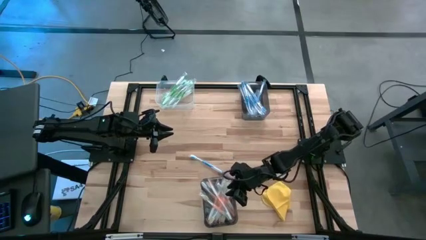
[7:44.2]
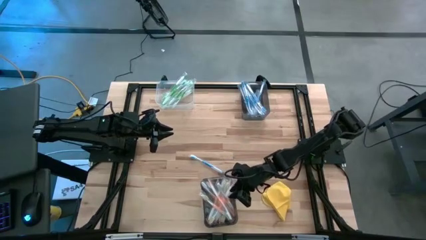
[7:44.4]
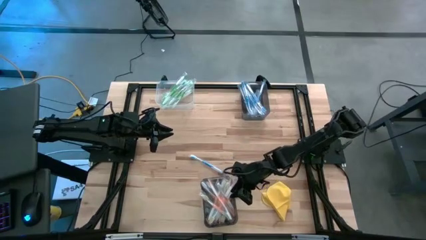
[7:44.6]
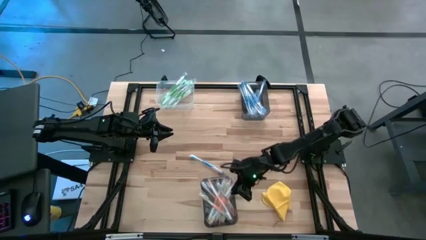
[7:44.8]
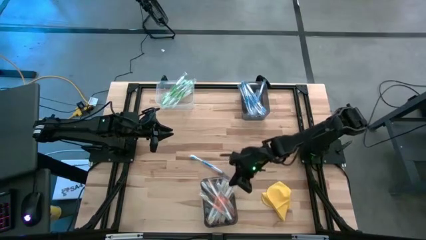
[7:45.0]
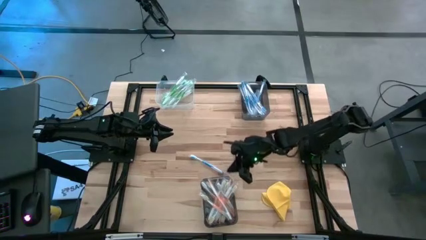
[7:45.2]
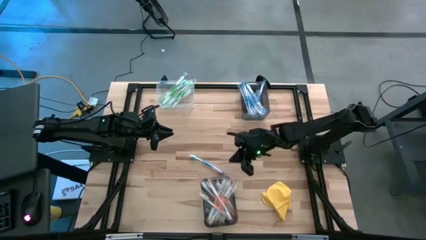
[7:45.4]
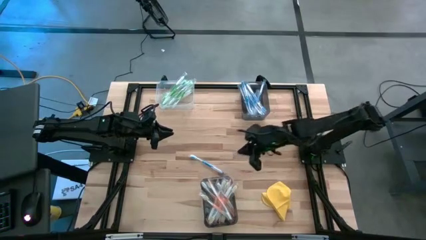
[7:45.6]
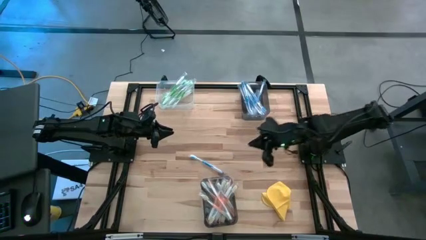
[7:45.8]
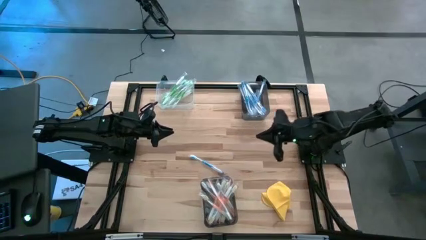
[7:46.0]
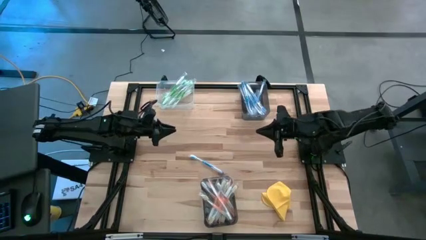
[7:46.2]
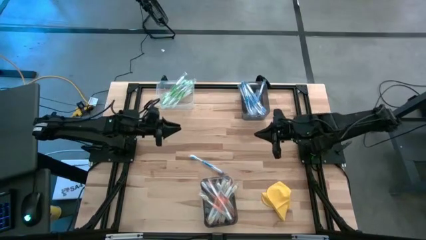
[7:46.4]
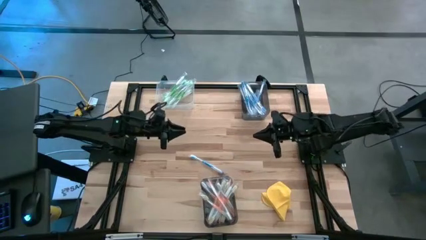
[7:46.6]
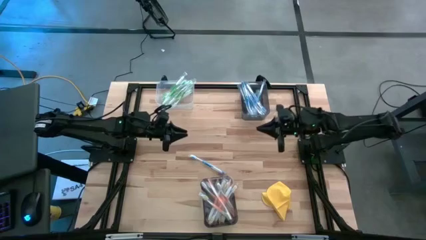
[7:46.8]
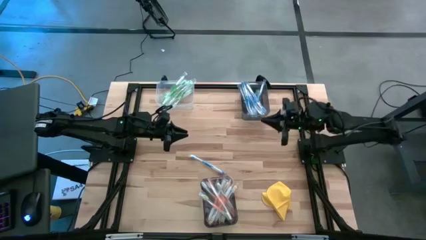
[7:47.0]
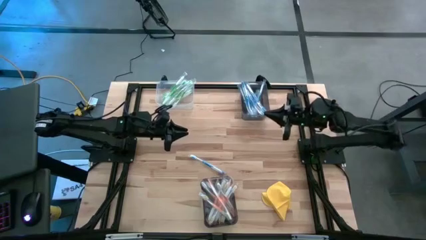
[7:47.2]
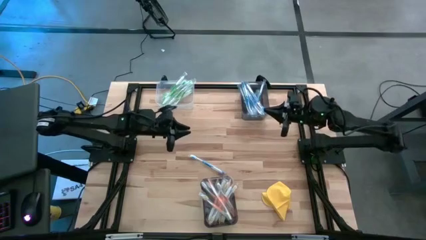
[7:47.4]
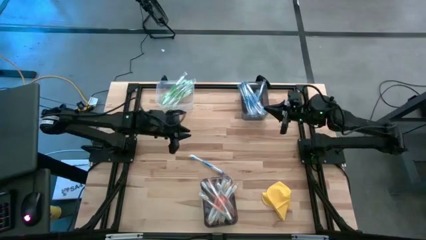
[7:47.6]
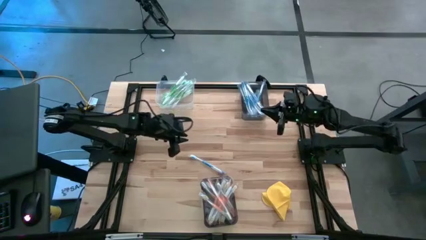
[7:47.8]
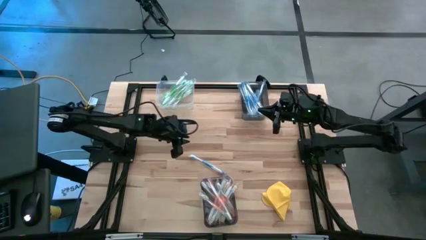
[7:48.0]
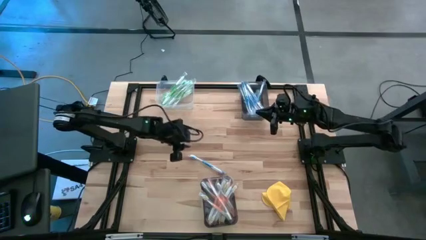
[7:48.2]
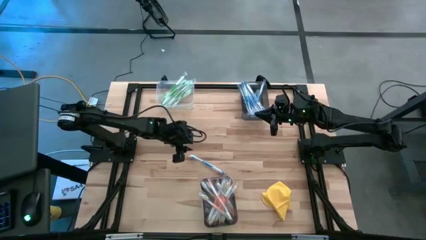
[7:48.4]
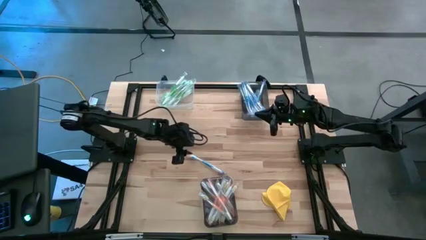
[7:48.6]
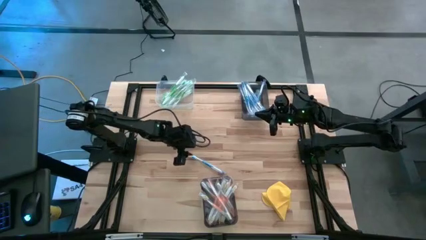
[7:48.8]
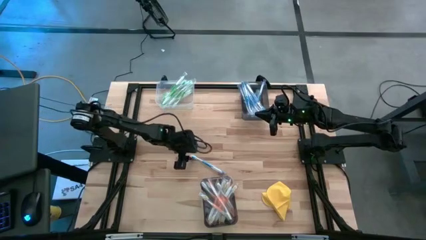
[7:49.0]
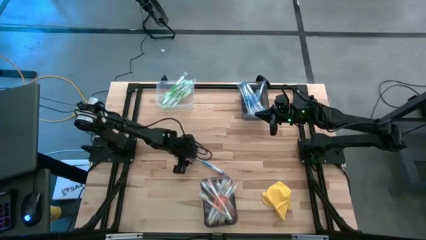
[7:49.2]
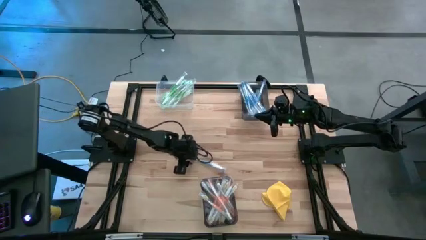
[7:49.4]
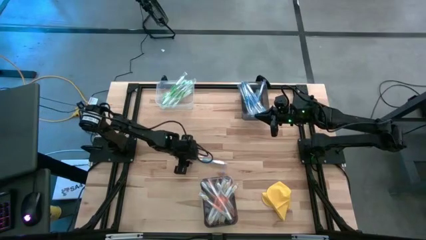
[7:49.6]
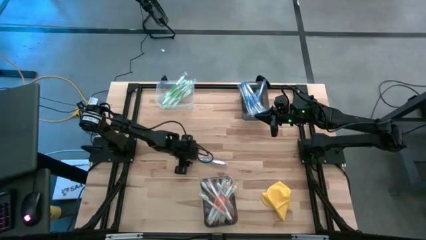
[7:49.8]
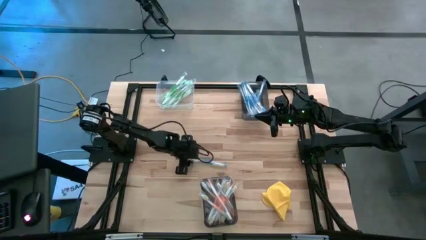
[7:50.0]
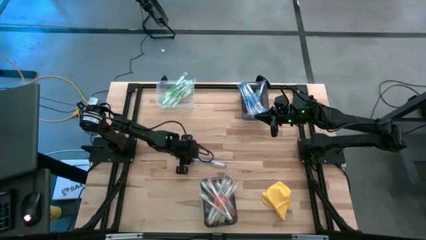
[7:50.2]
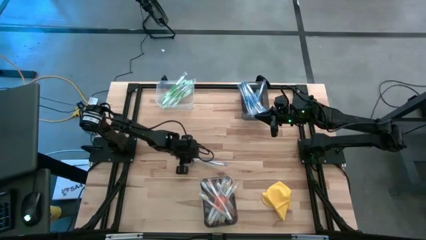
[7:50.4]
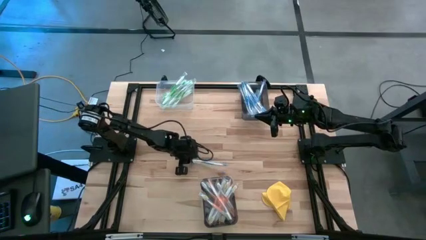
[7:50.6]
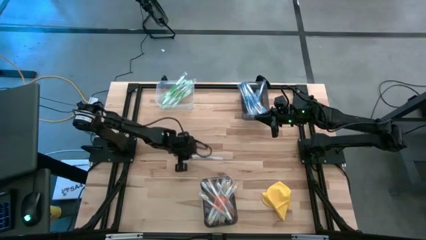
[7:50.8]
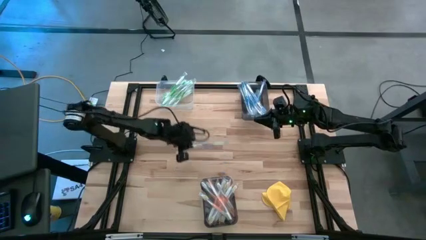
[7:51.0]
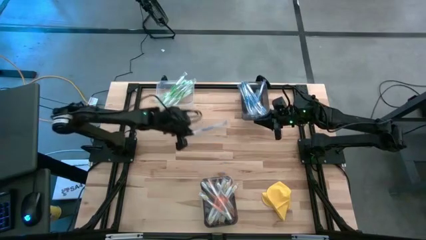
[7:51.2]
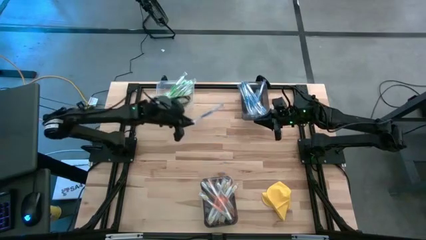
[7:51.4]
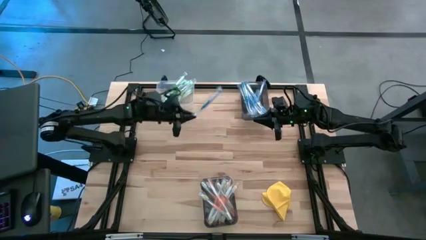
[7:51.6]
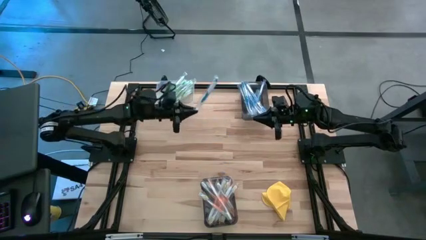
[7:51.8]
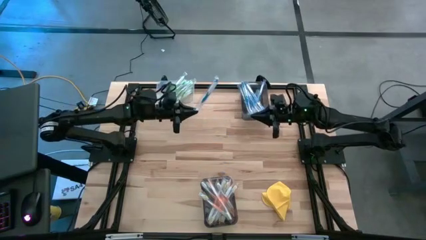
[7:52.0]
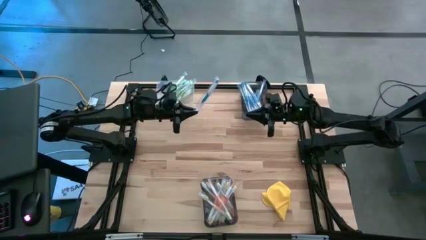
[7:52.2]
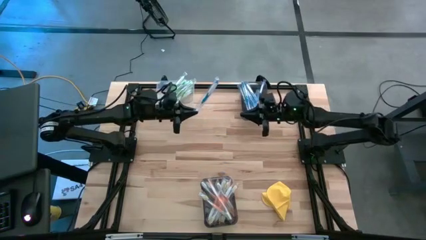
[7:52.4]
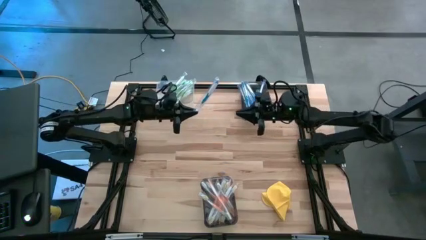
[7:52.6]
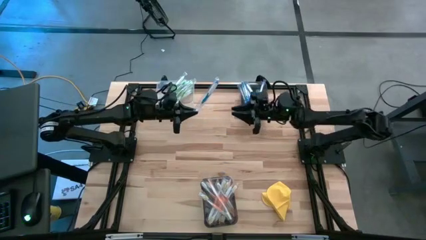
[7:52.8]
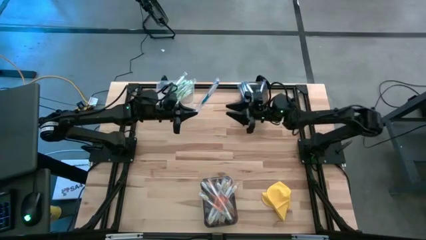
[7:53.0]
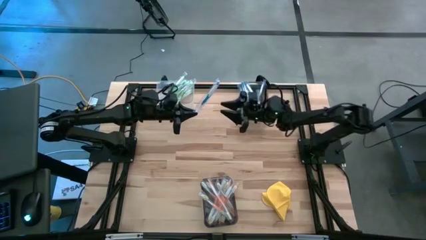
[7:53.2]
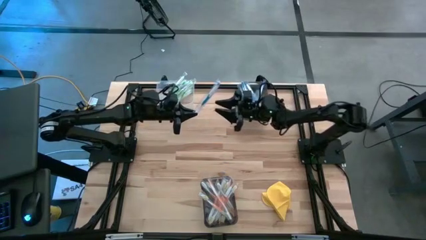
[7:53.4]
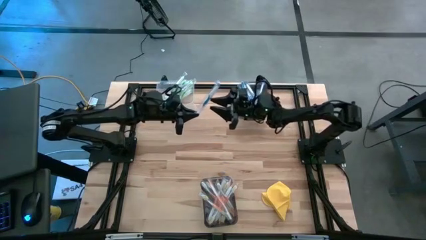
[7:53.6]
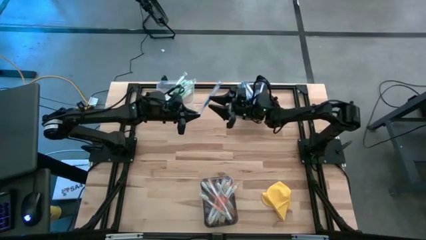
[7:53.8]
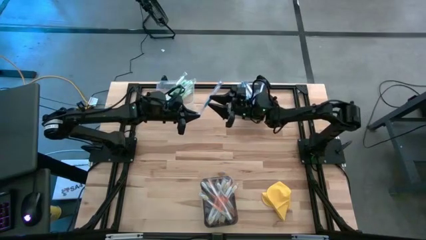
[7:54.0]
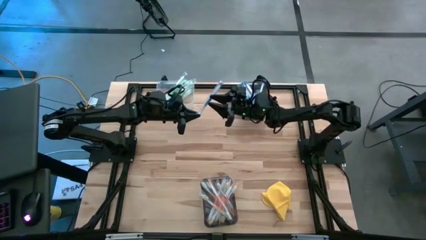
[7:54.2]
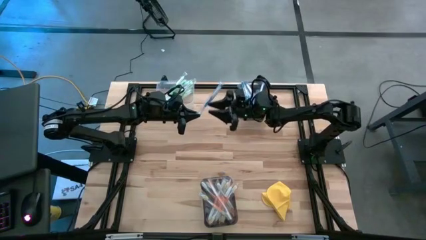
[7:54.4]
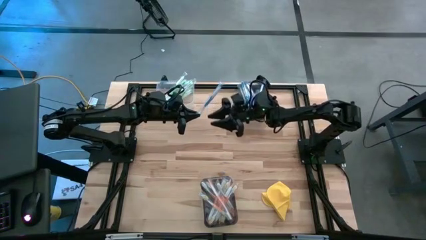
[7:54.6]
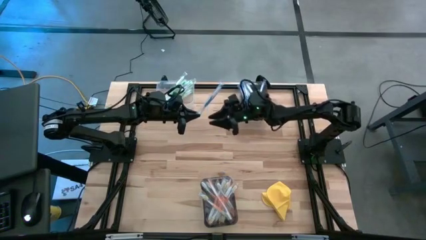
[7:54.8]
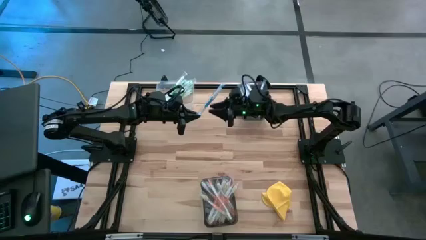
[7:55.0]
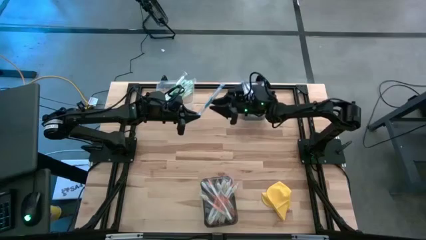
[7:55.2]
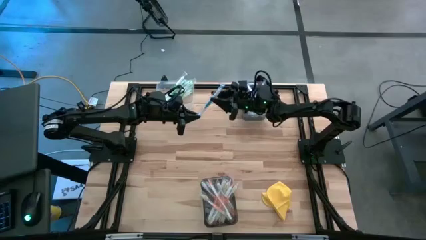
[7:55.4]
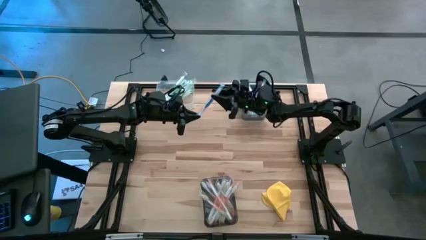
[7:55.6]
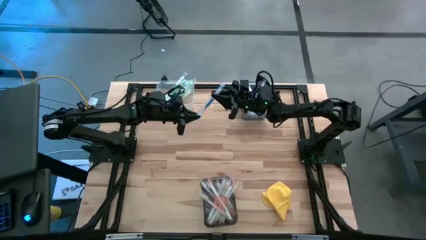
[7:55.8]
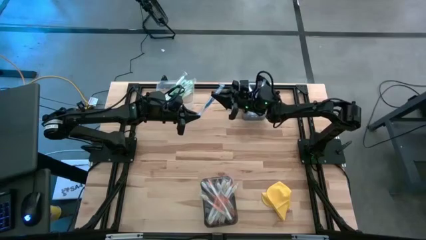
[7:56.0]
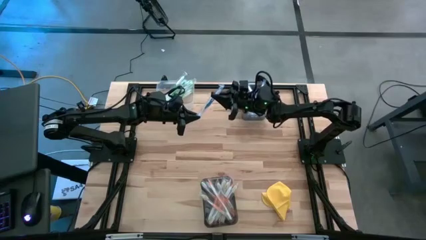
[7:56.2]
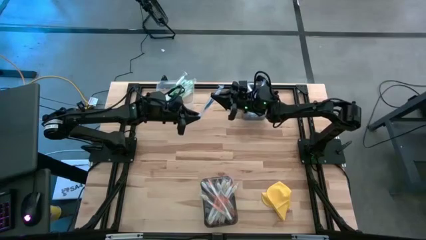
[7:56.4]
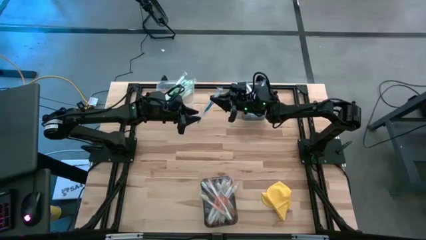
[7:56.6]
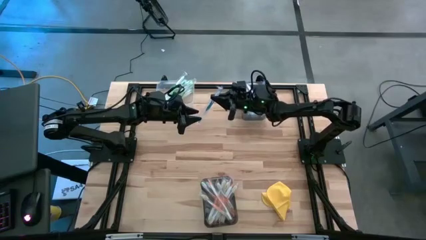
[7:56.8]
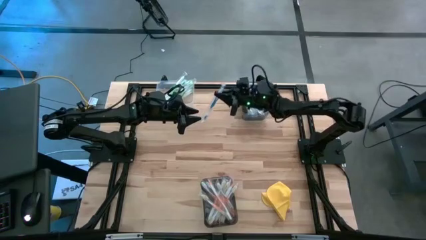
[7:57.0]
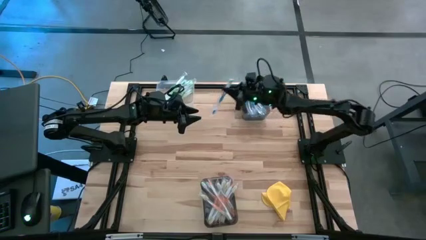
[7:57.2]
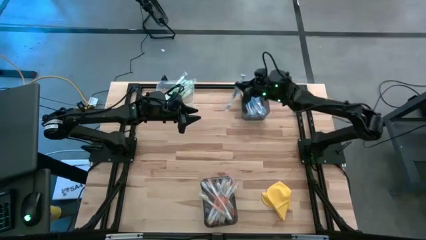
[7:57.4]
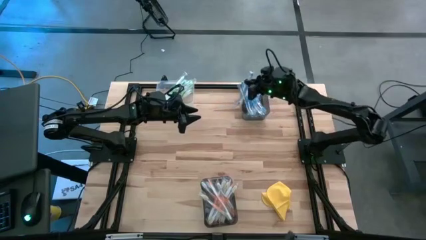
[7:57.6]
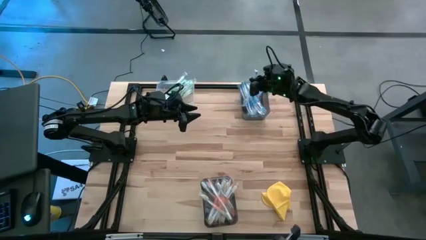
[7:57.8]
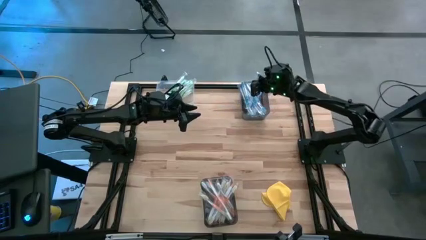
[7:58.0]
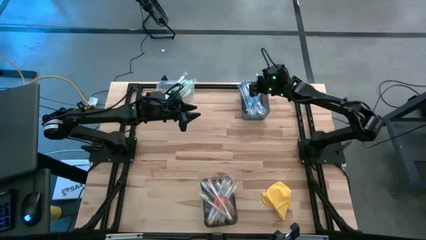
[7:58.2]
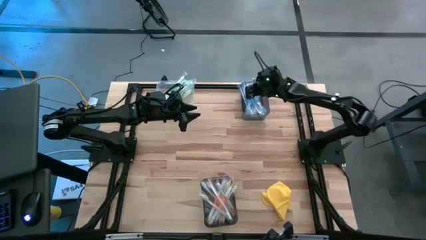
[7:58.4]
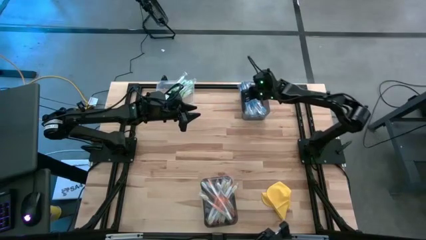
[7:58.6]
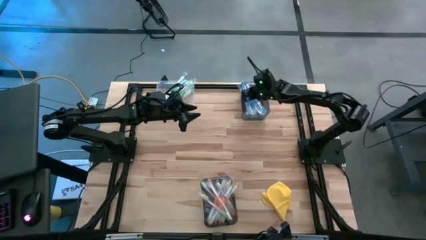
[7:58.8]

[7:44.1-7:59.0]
Task: Pick & Place Toothbrushes
Put the blue toothbrush into the top black bin

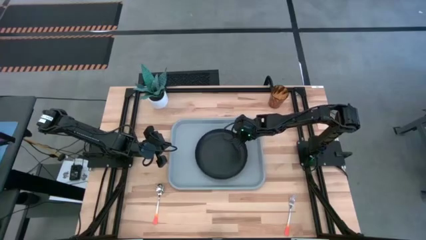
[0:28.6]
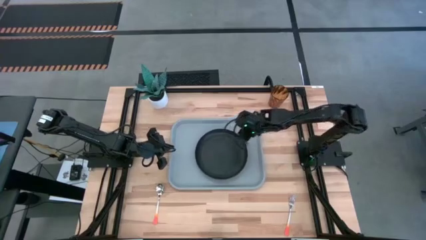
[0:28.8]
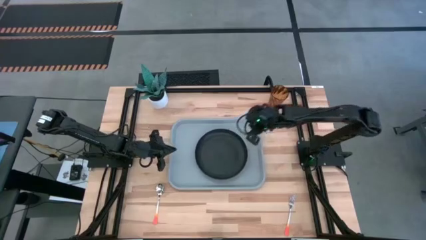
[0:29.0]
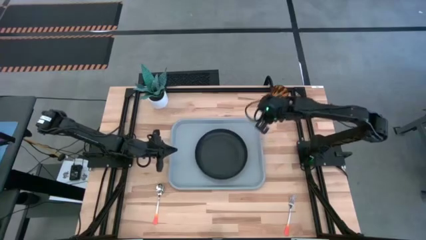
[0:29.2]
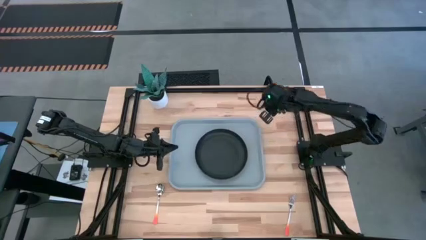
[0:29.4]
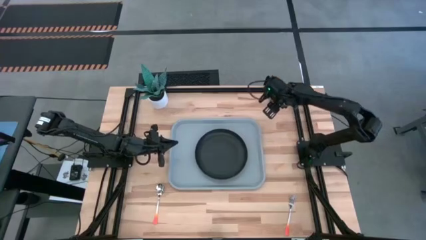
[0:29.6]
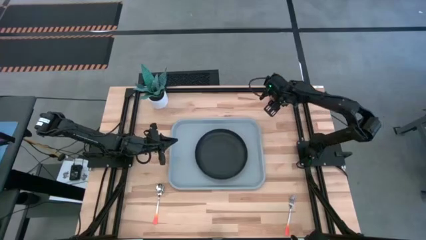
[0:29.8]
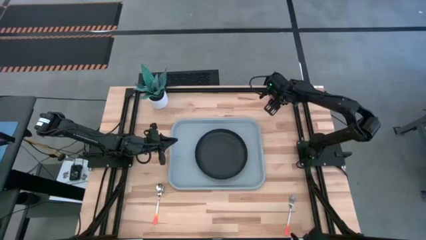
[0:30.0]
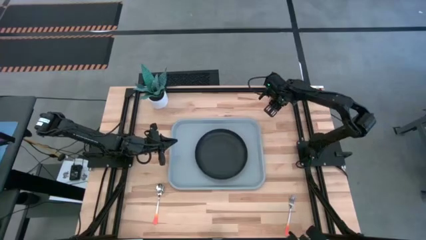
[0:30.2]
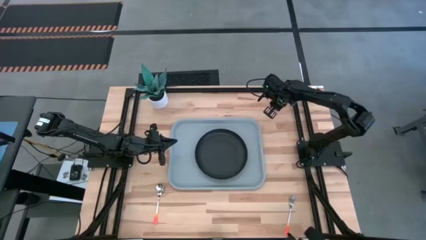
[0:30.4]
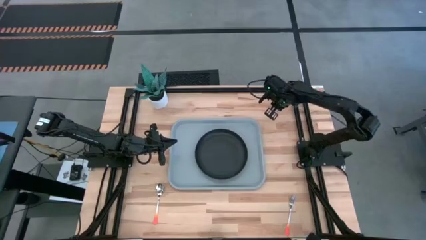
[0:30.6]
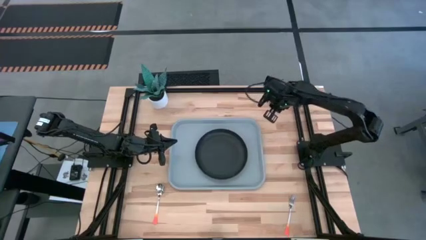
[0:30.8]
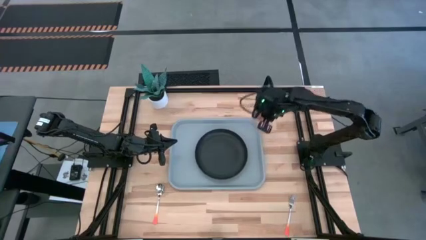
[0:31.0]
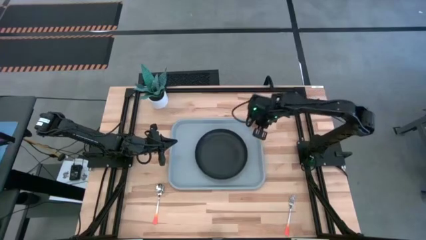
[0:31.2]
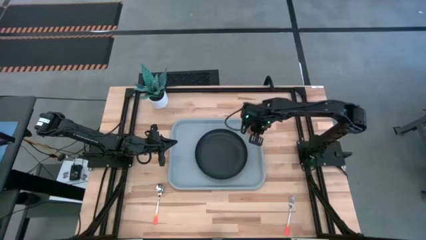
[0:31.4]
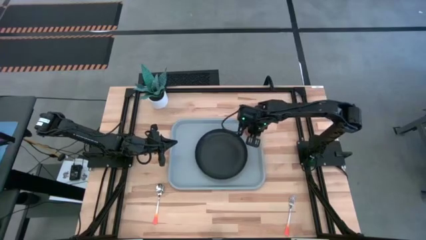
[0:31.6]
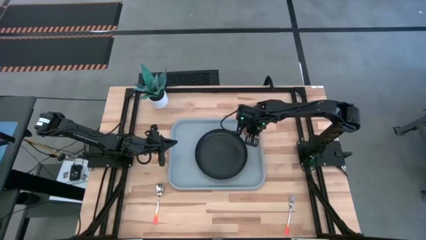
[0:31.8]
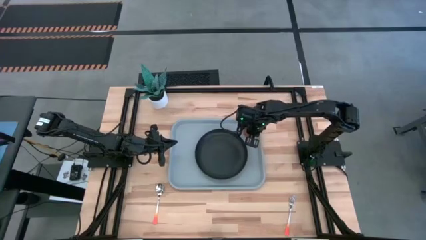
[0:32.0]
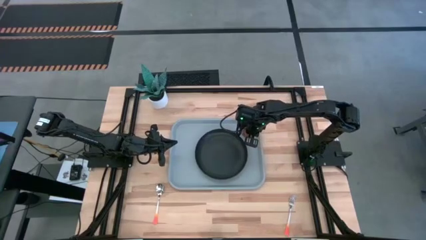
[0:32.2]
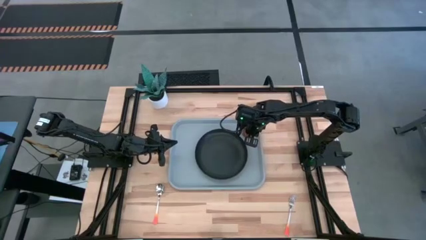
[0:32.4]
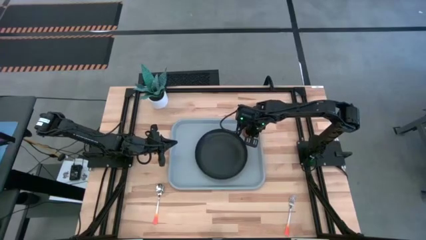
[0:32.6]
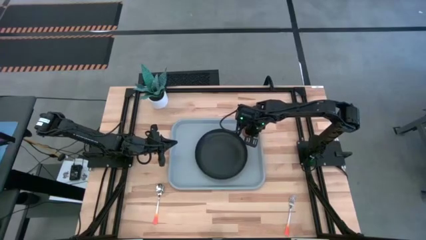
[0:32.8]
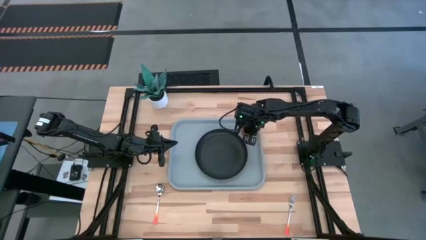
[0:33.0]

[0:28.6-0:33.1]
Task: Pick and place plate/cup/fork/spoon on tray
Put the brown cup on the gray tray to the top right of the black plate
